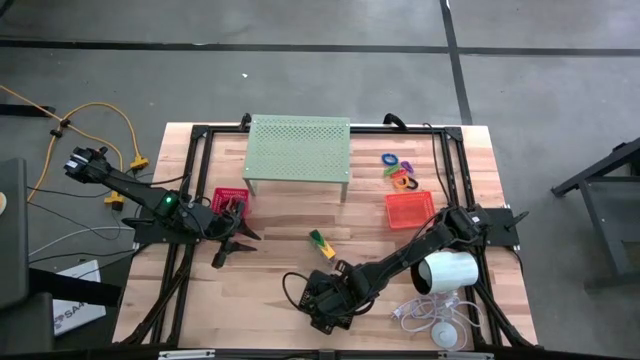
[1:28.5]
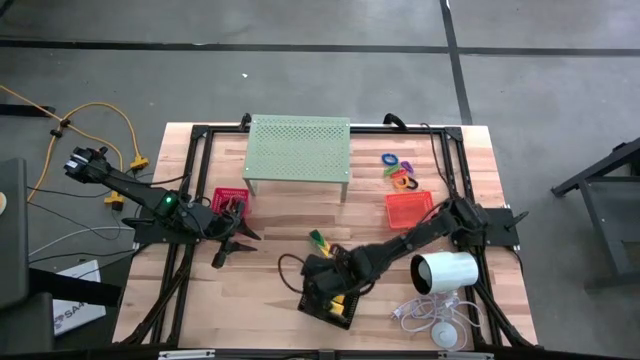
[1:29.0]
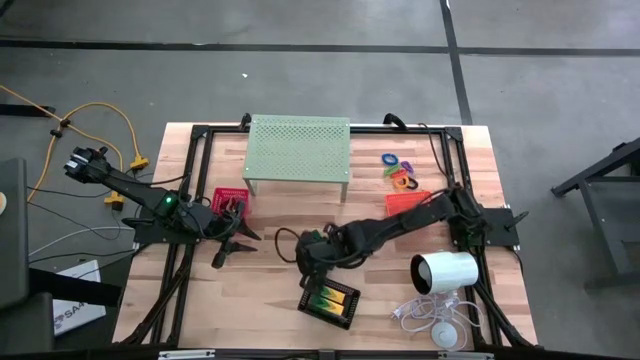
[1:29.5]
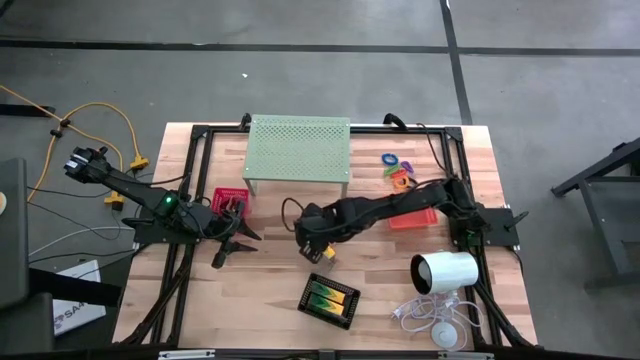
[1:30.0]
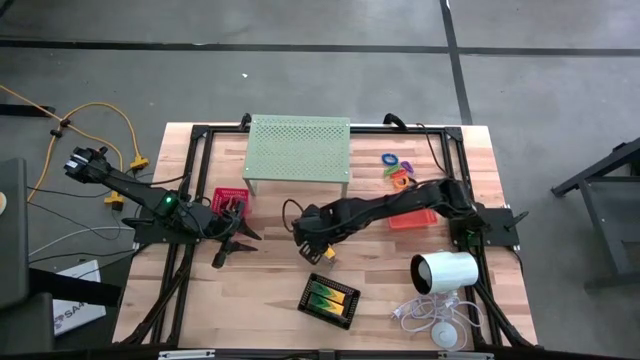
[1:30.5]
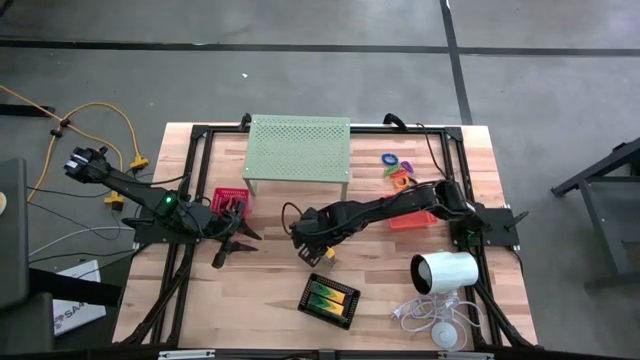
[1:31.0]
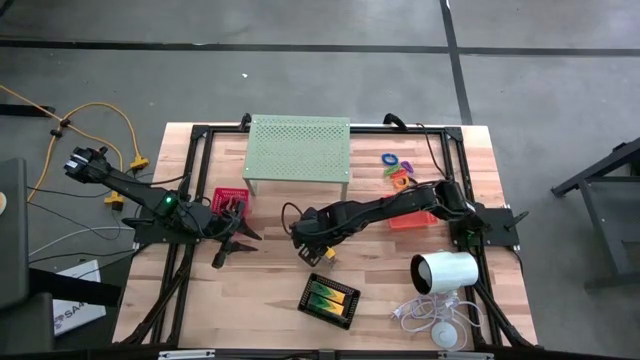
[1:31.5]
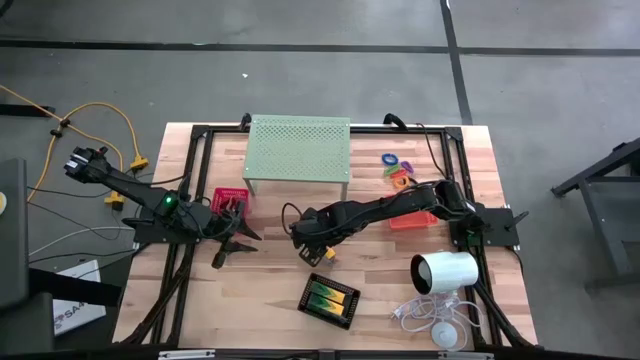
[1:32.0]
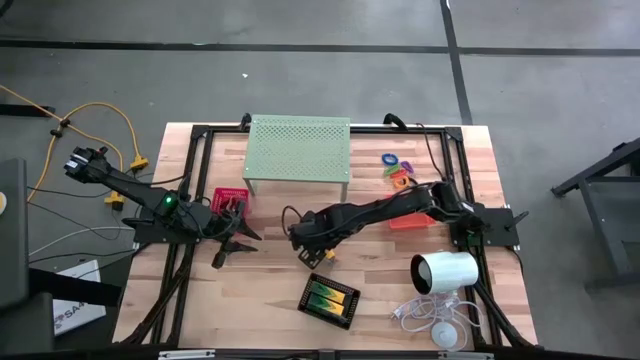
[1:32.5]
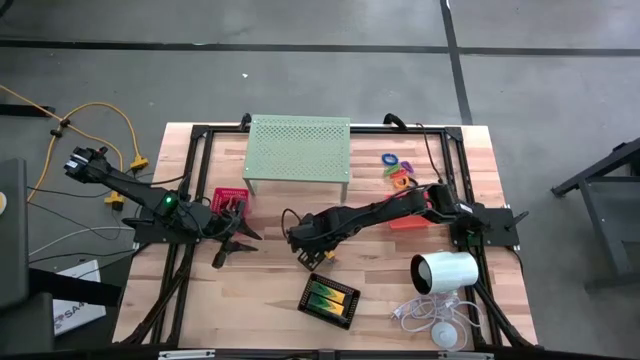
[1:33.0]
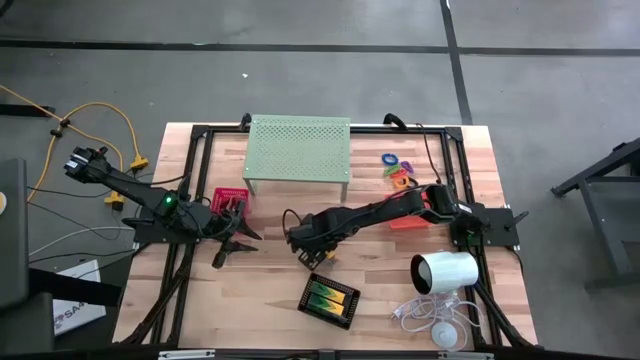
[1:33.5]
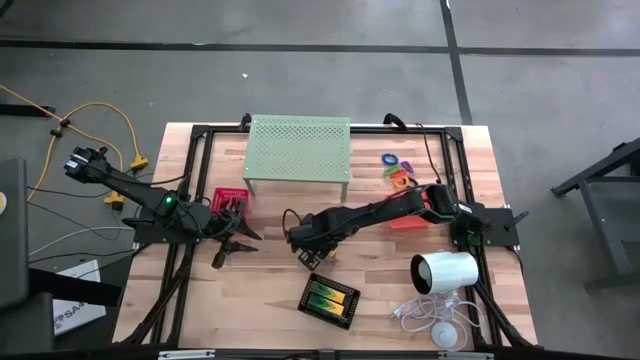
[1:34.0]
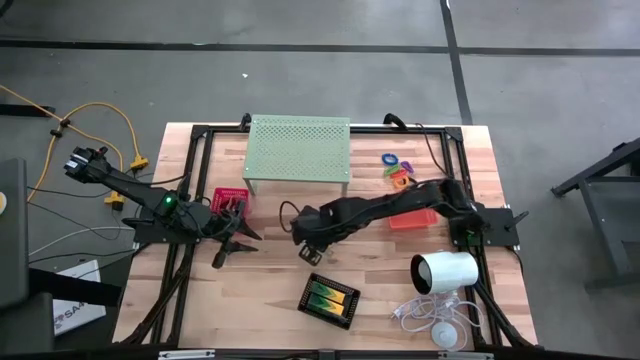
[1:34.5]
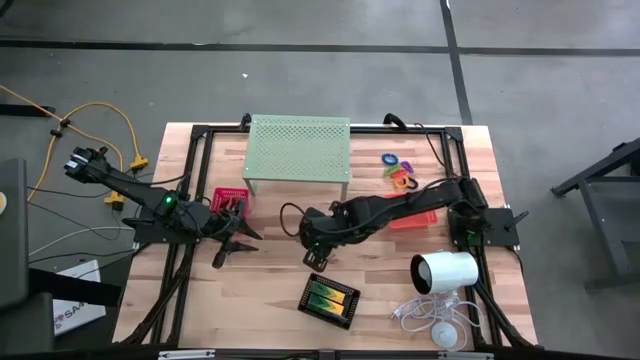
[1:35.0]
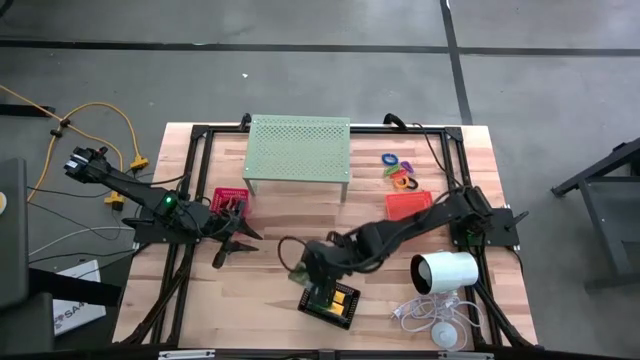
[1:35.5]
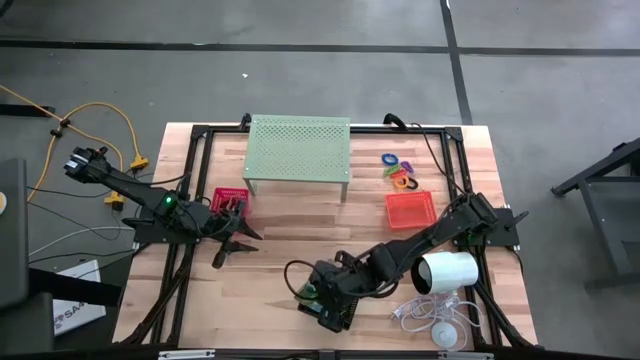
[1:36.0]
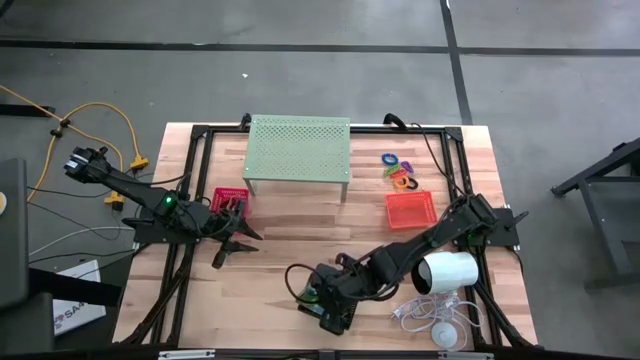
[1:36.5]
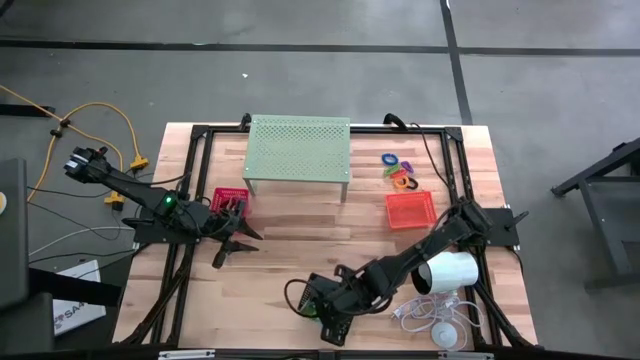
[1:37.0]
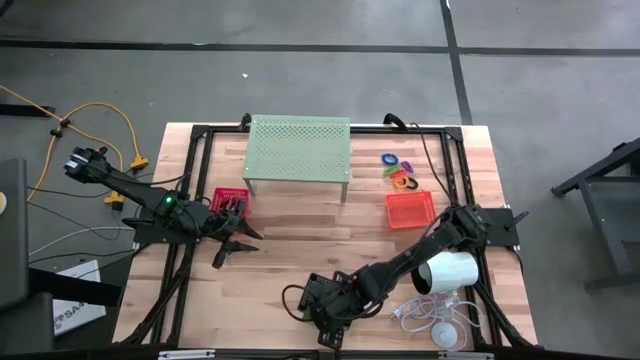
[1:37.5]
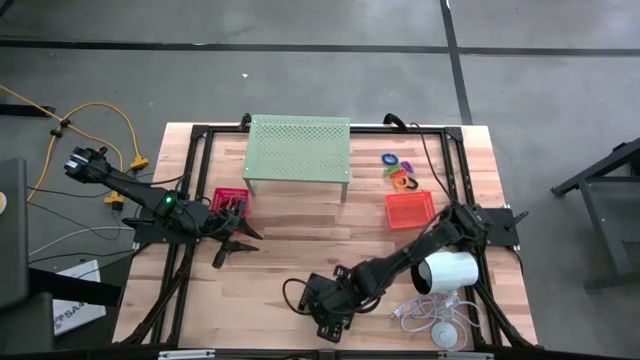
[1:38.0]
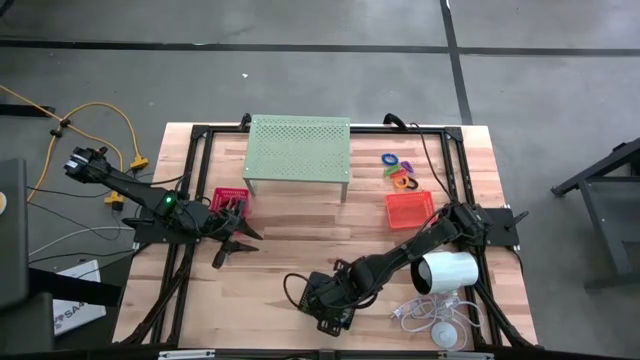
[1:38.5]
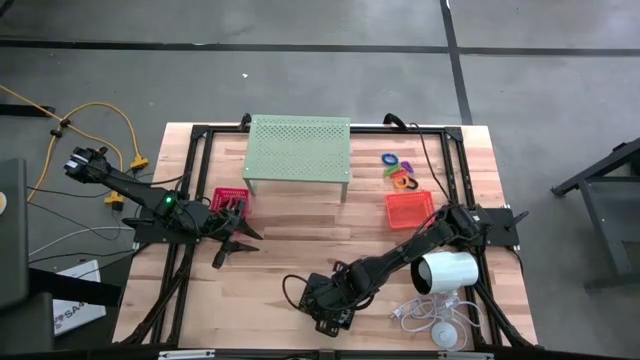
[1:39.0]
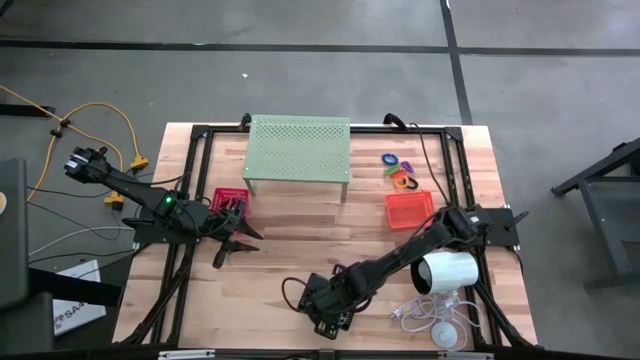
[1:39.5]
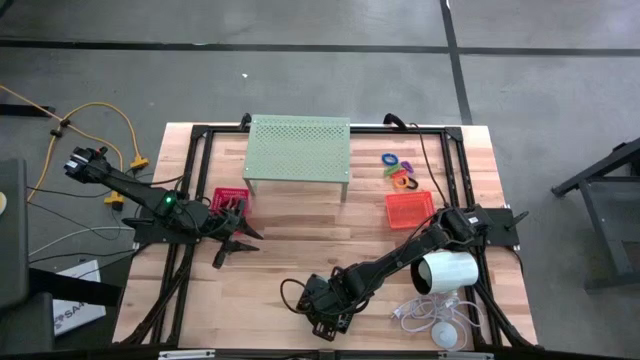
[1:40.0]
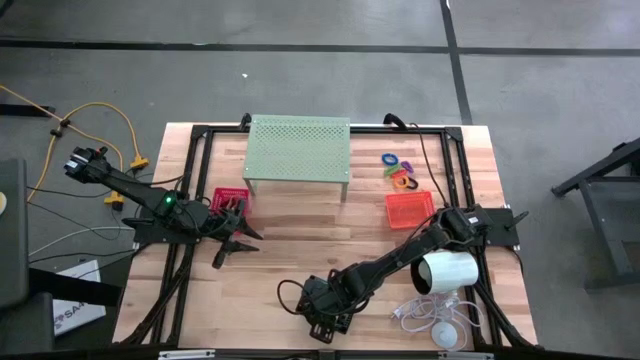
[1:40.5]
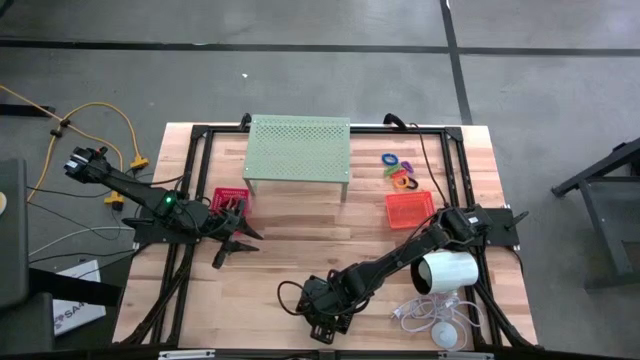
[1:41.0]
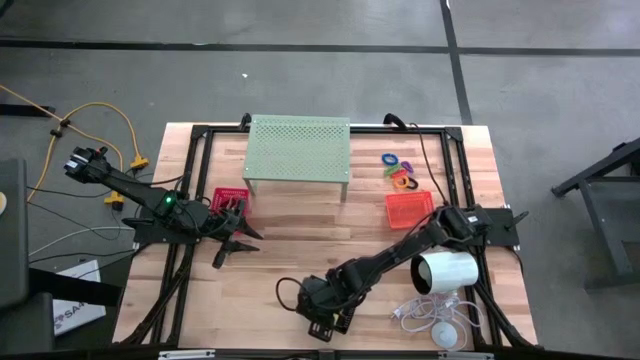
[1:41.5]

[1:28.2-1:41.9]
Task: Pick & Place Office Desk Supplies
Put the crayon box into the black bin

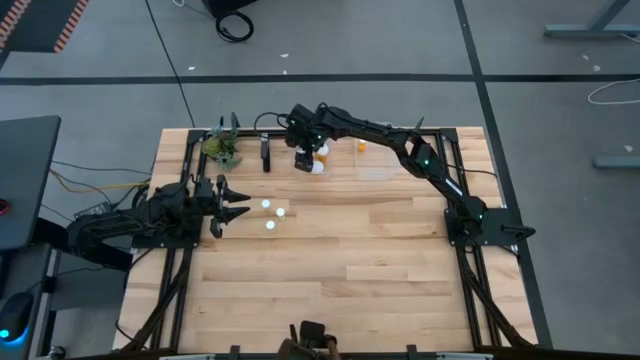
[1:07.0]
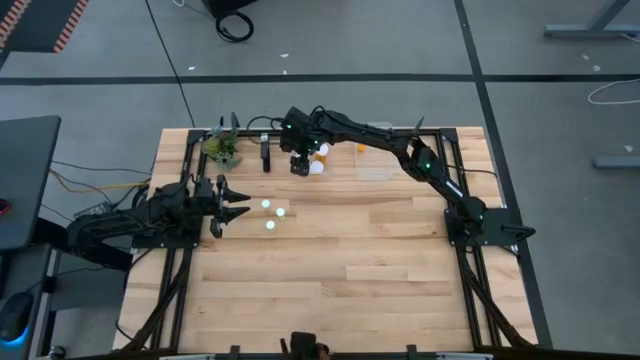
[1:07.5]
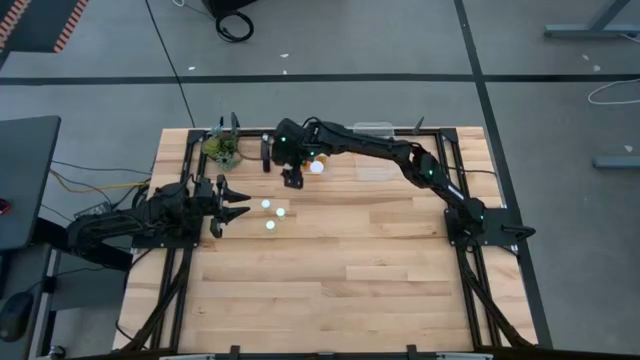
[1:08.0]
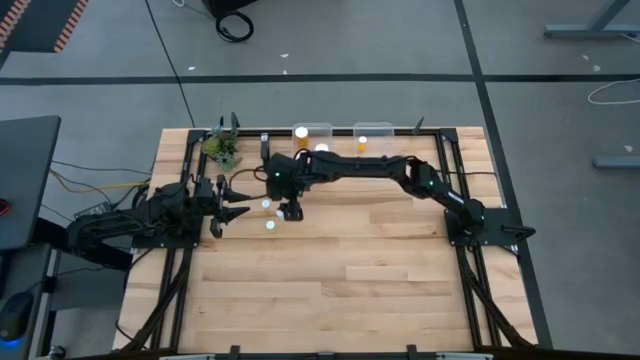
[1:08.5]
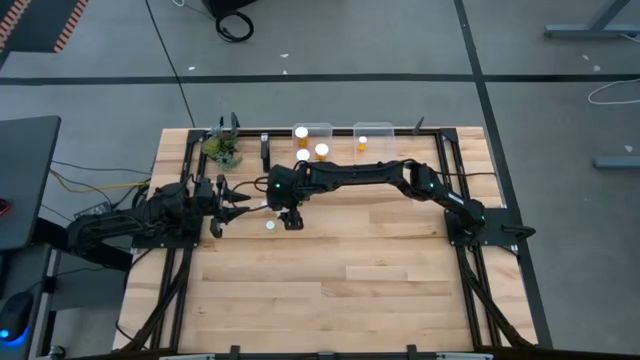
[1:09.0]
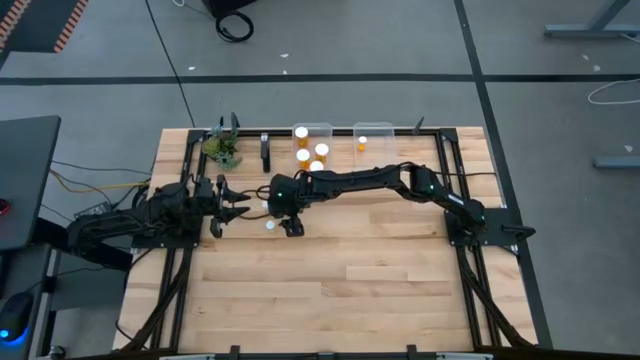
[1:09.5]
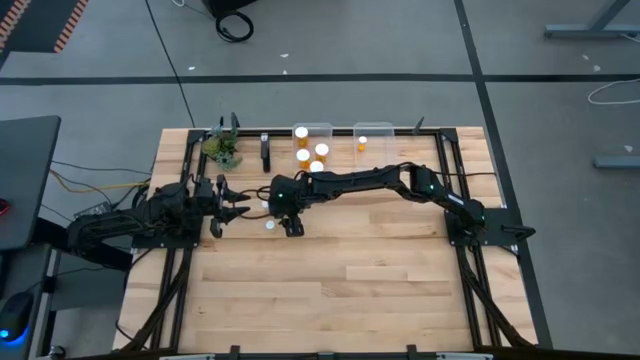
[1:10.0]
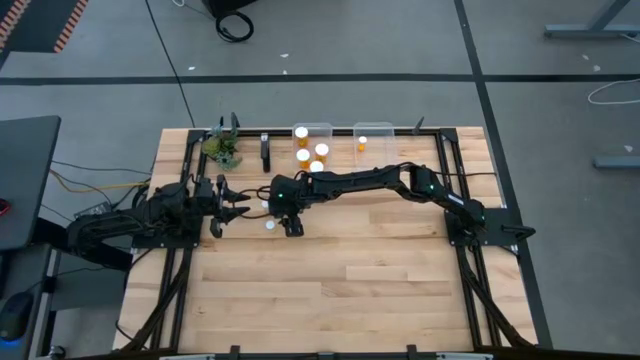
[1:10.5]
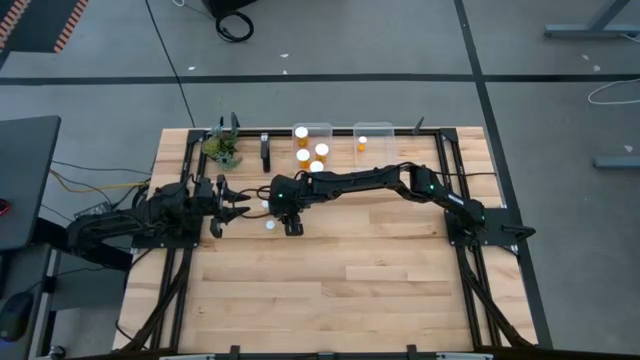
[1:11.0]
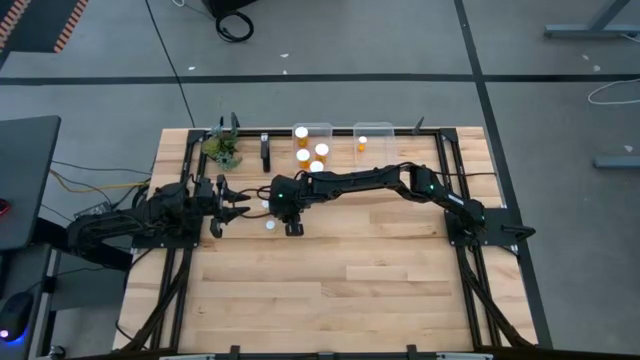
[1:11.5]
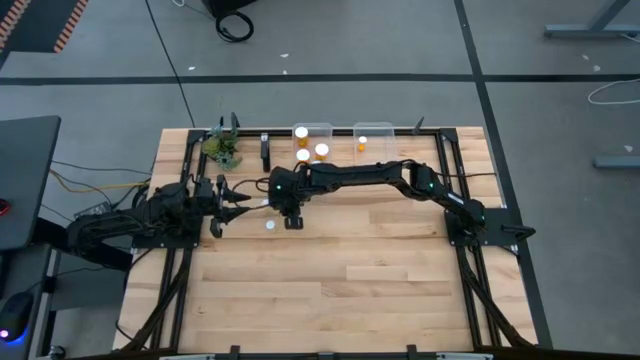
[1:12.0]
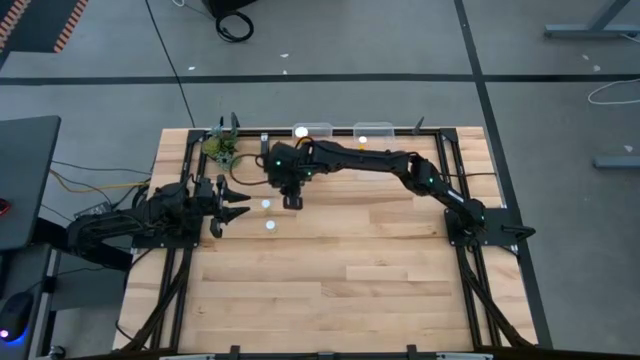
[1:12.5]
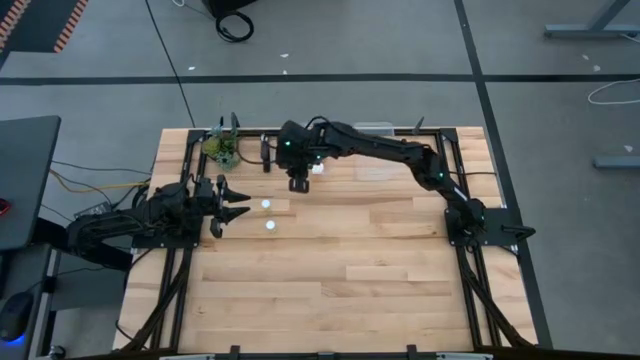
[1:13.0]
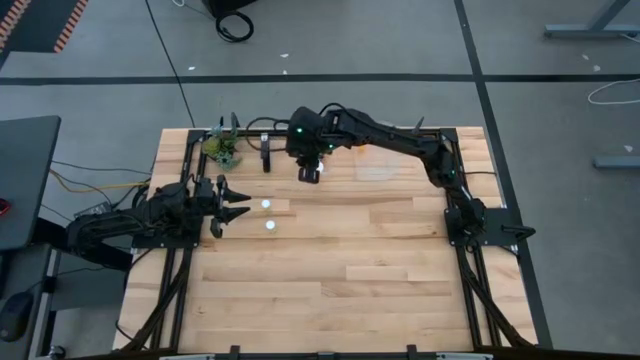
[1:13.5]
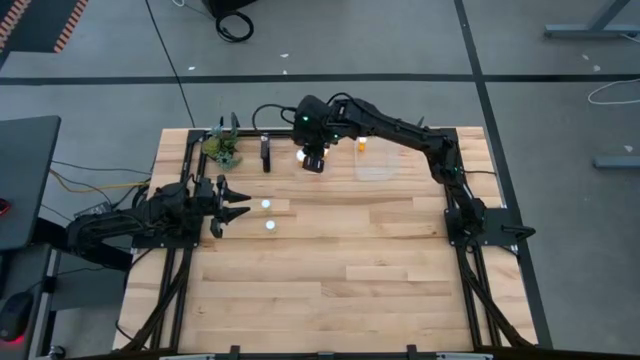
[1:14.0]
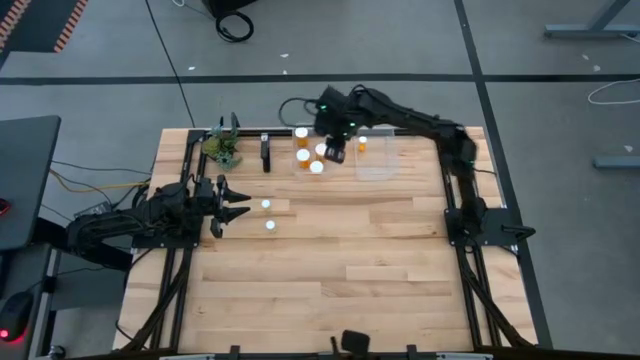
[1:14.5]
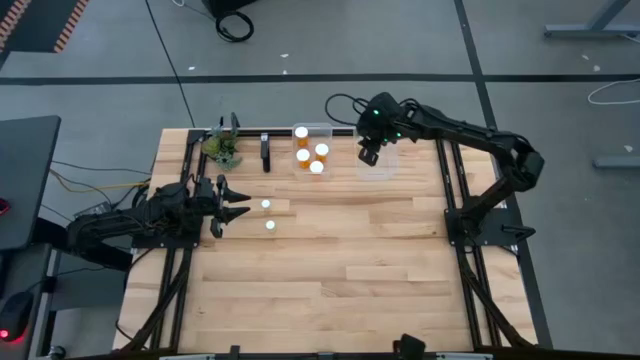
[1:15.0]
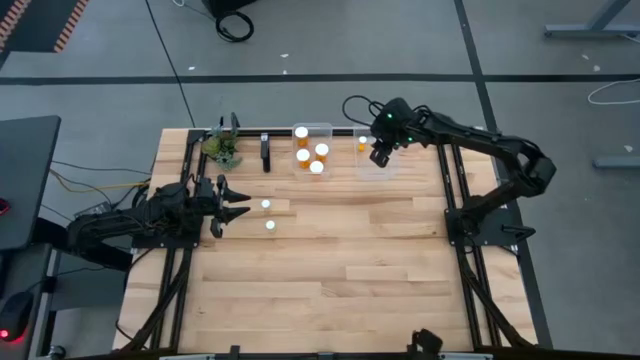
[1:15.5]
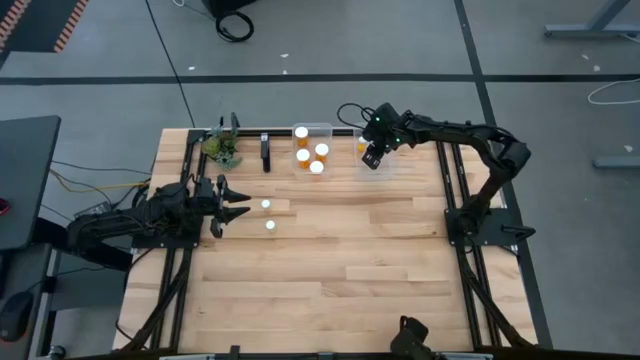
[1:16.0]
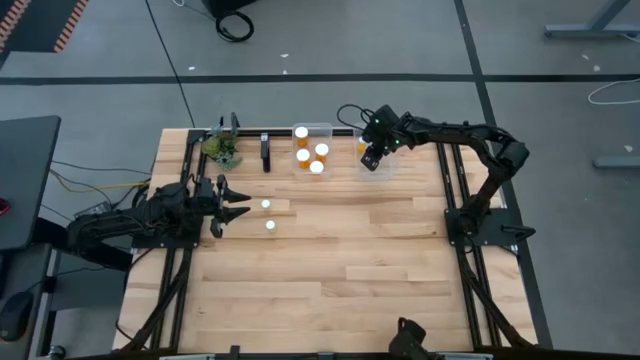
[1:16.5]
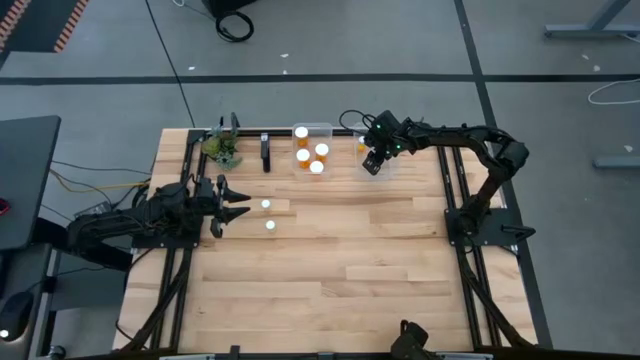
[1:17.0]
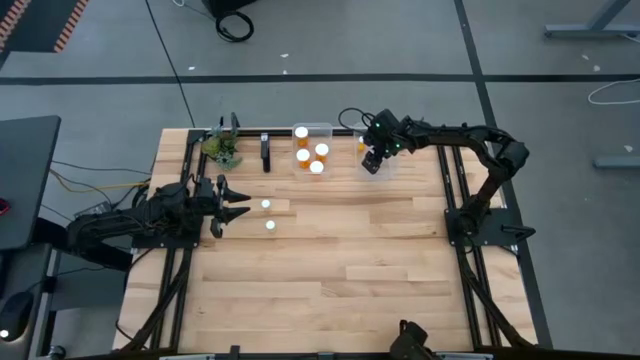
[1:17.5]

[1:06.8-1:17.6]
Task: Pick and place medicine bottles into bin by pill shape (circle, oval)
Put the small yellow pill bottle into the right transparent bin
